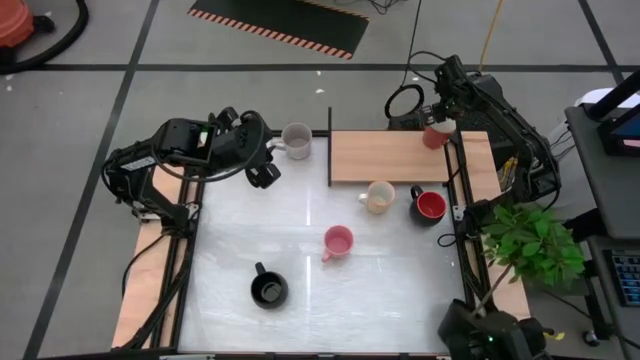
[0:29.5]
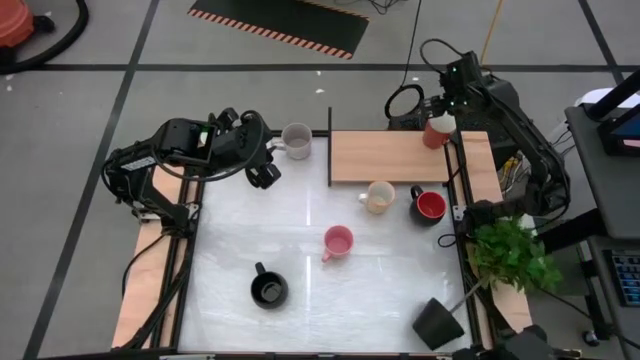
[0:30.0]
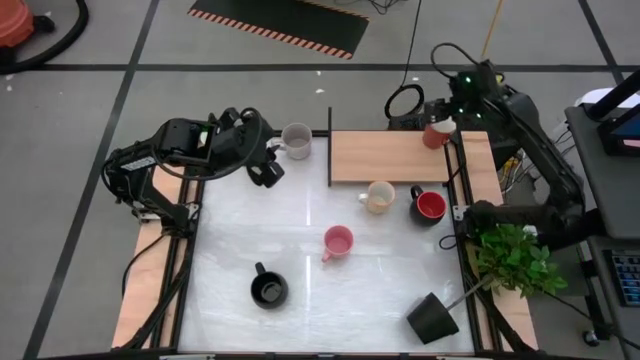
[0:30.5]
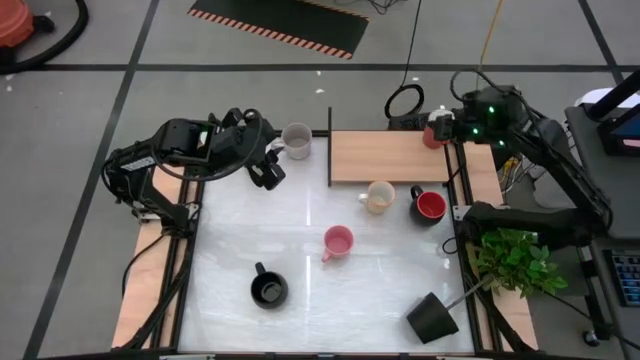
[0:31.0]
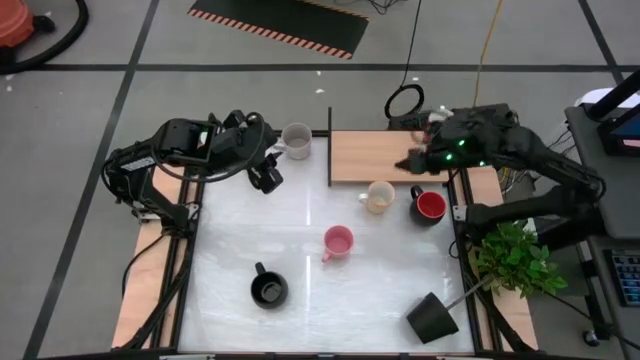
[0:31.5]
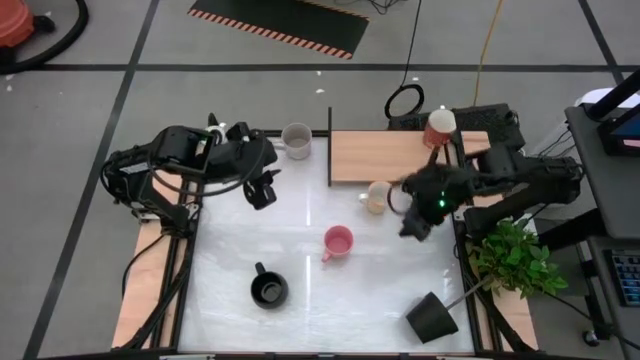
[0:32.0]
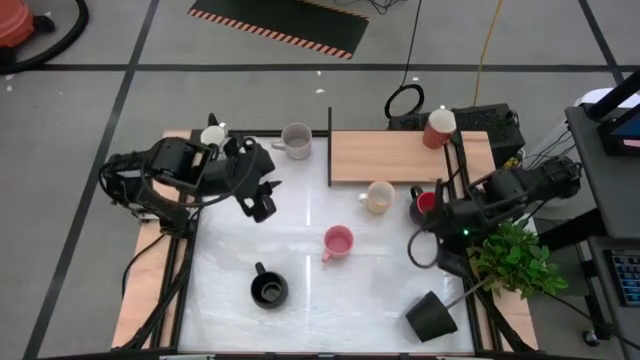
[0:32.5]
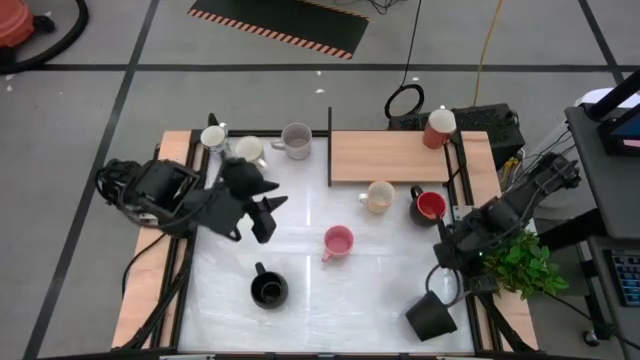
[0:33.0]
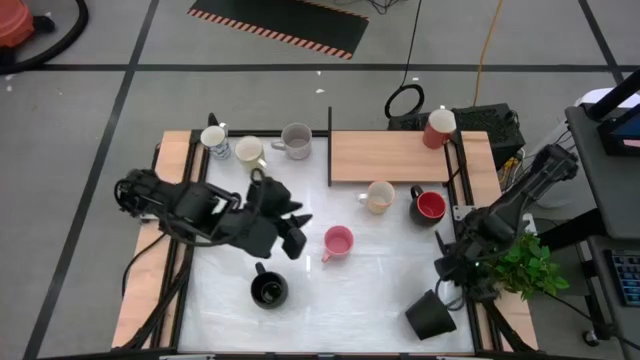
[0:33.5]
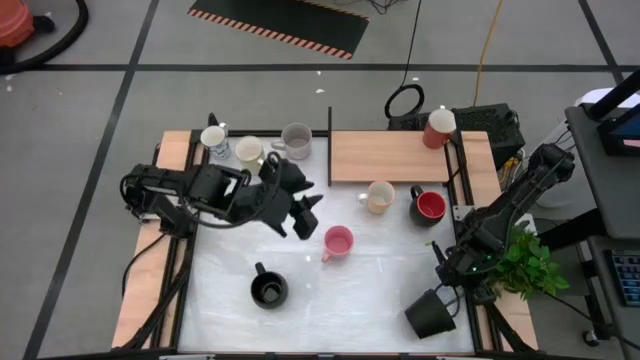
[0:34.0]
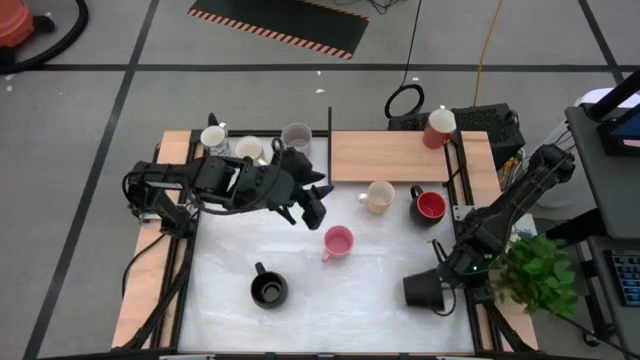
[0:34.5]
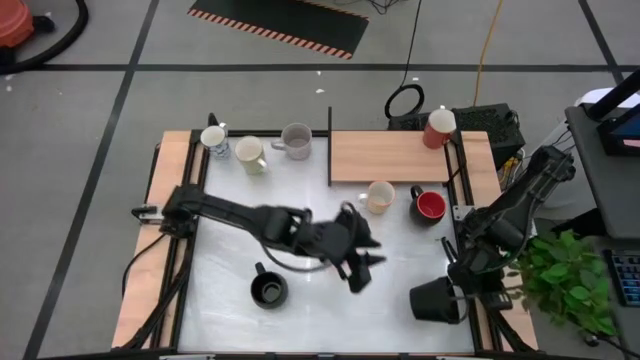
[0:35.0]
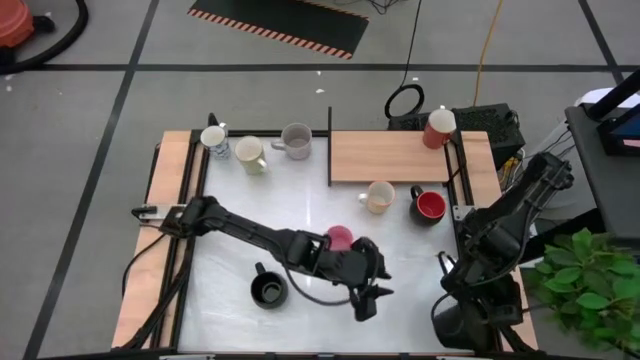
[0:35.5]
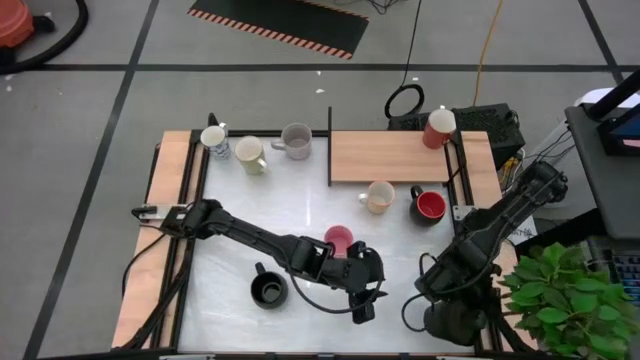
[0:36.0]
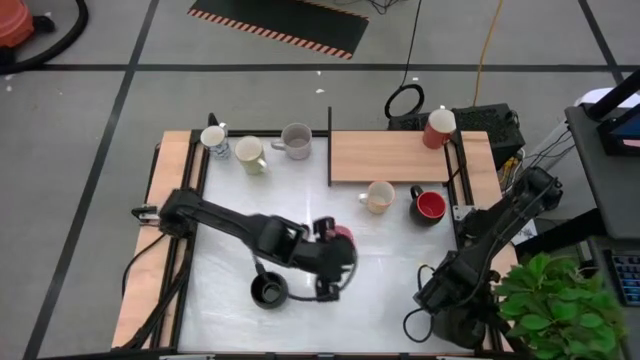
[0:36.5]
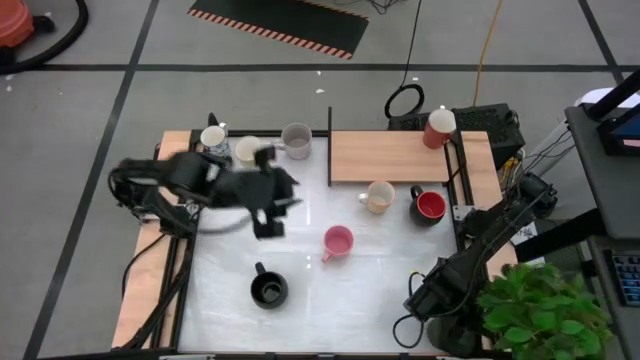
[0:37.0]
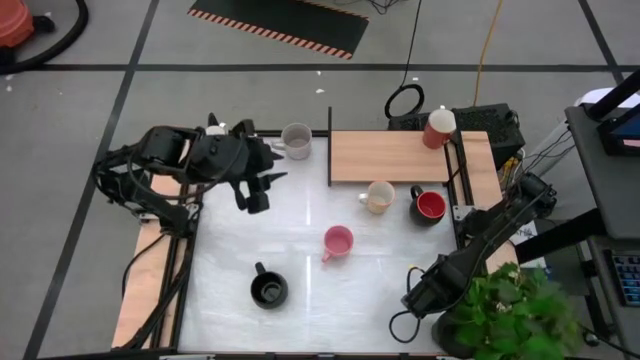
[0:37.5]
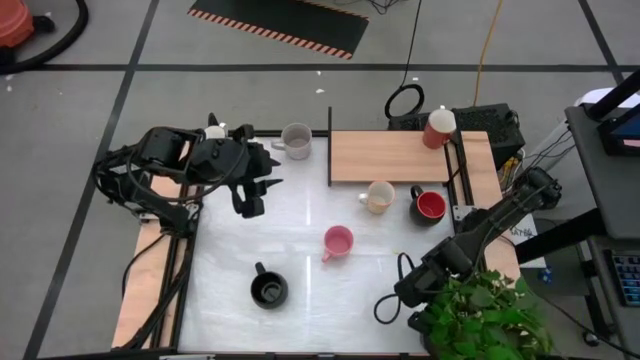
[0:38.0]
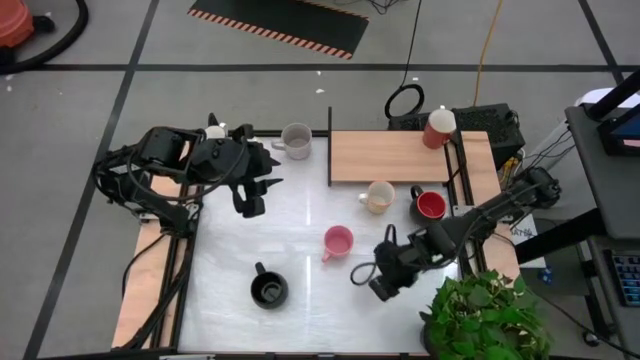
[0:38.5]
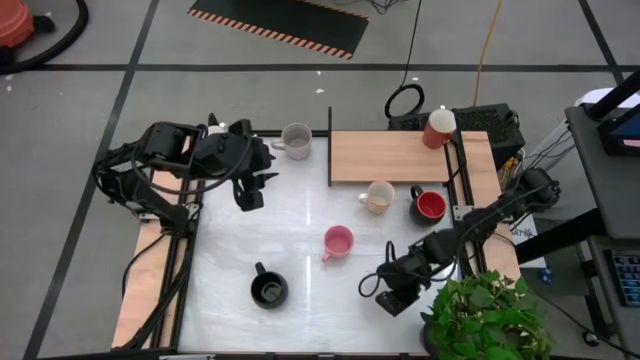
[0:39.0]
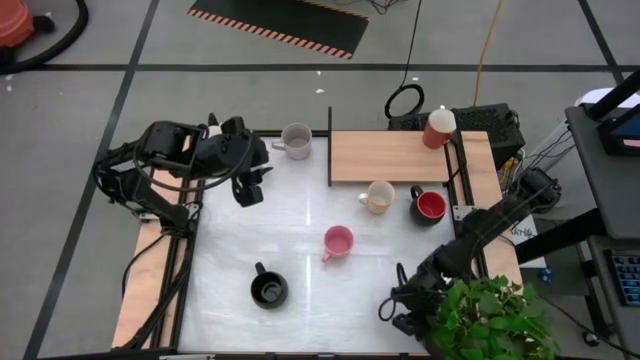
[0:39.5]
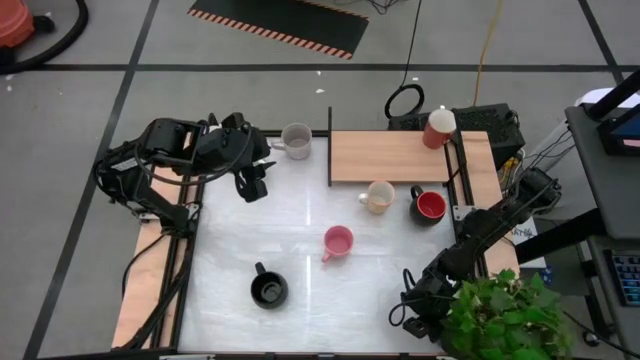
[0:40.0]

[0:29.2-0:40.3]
Task: Place coffee mugs
Adjust the plant

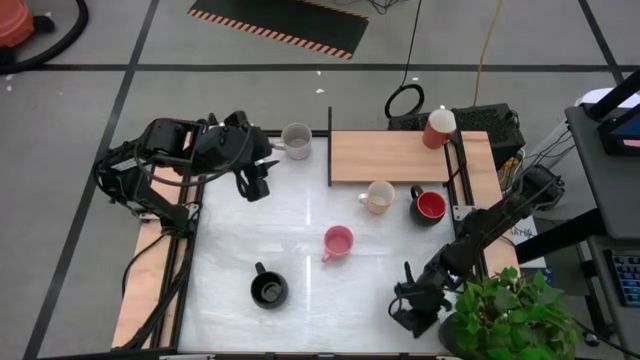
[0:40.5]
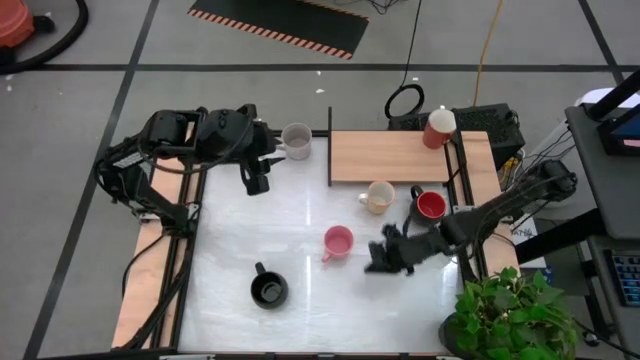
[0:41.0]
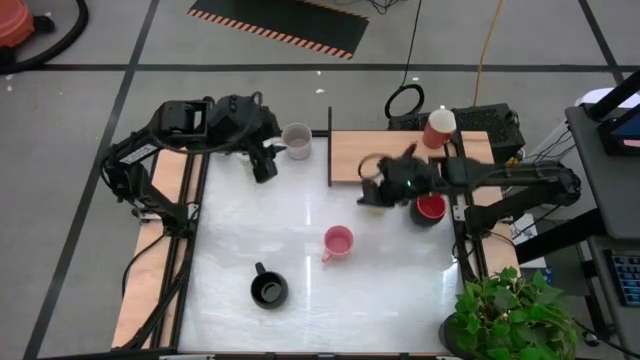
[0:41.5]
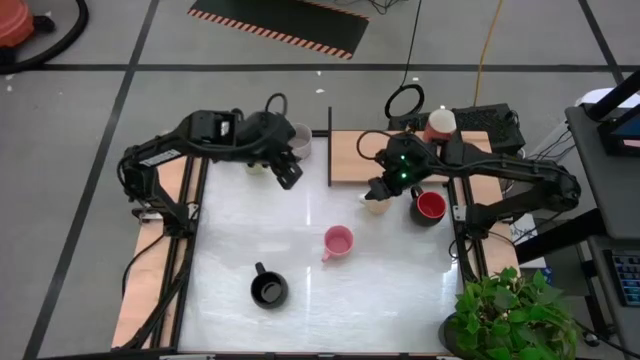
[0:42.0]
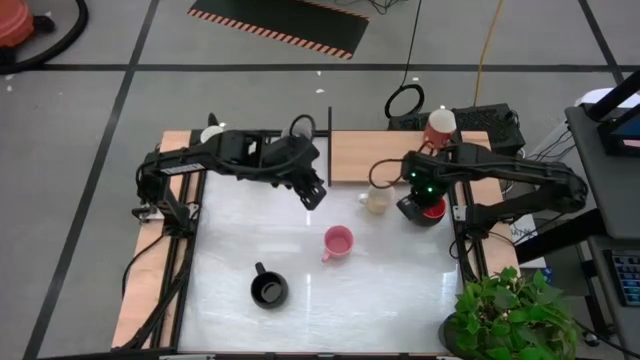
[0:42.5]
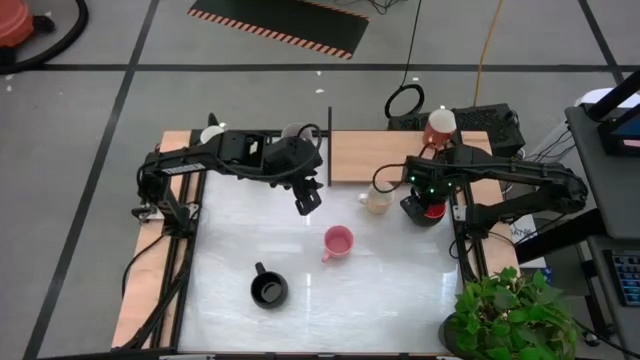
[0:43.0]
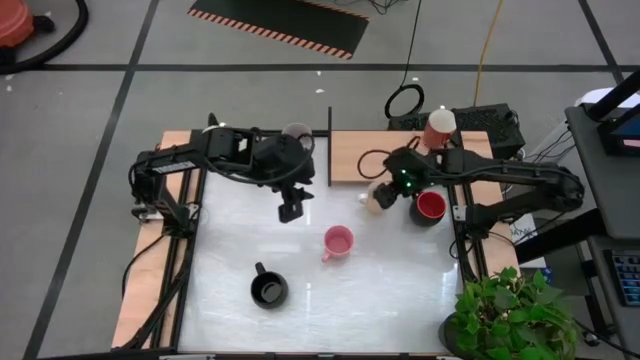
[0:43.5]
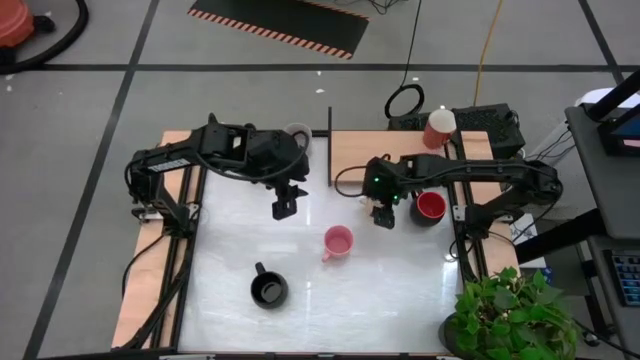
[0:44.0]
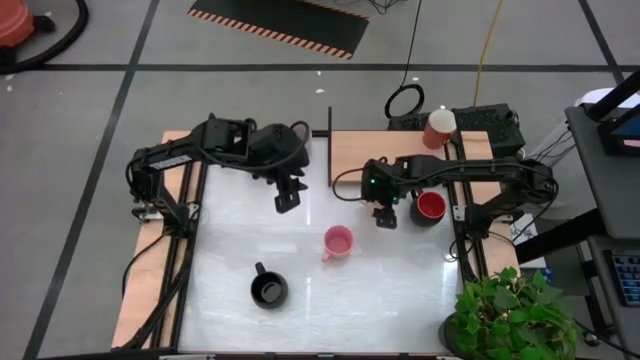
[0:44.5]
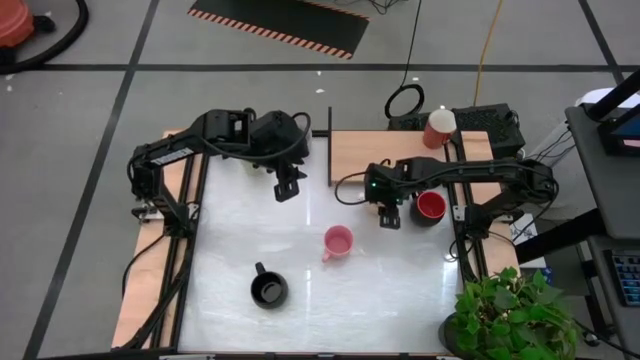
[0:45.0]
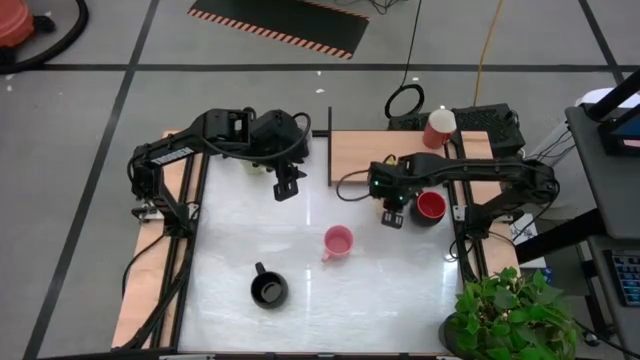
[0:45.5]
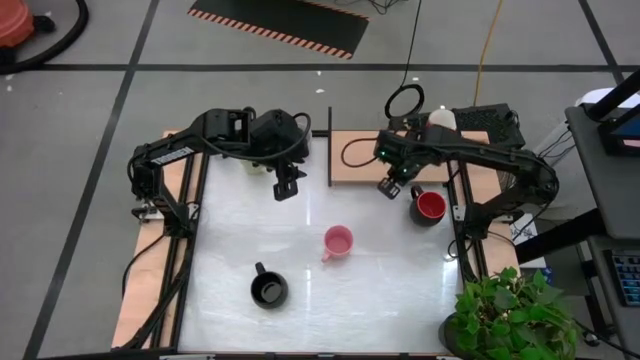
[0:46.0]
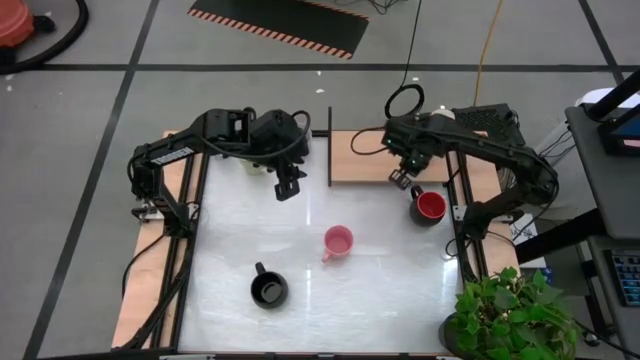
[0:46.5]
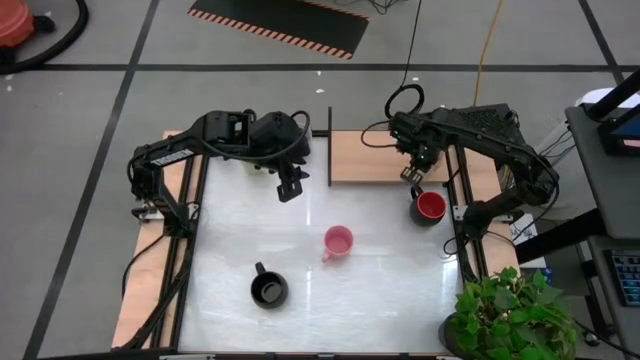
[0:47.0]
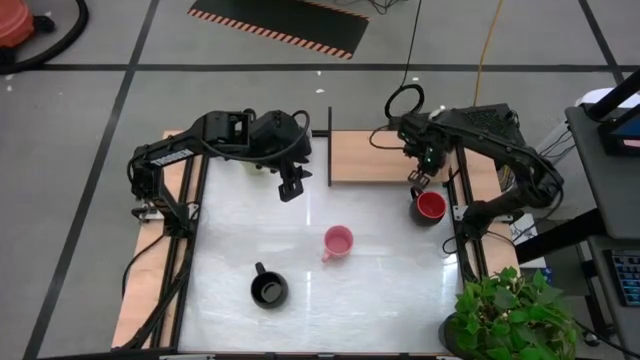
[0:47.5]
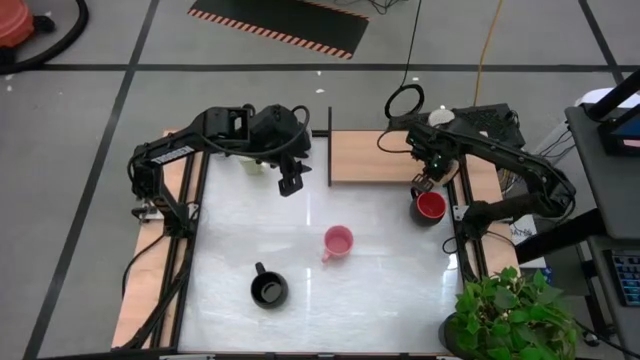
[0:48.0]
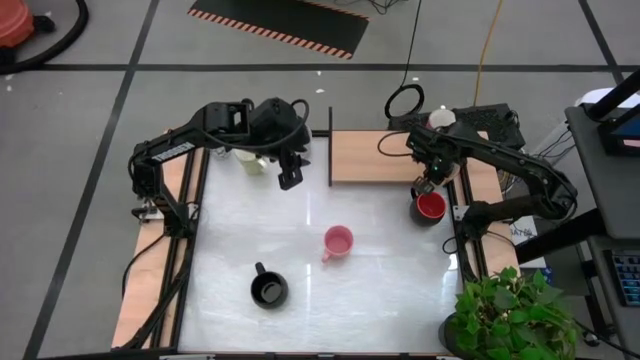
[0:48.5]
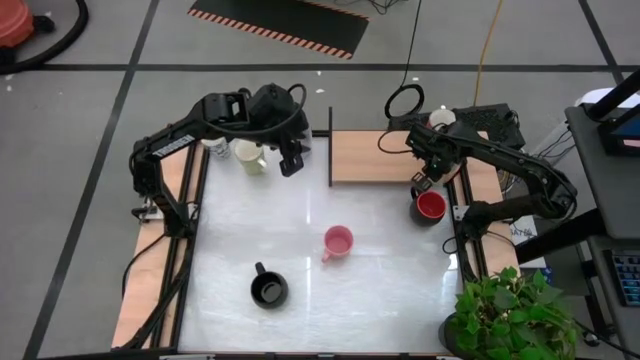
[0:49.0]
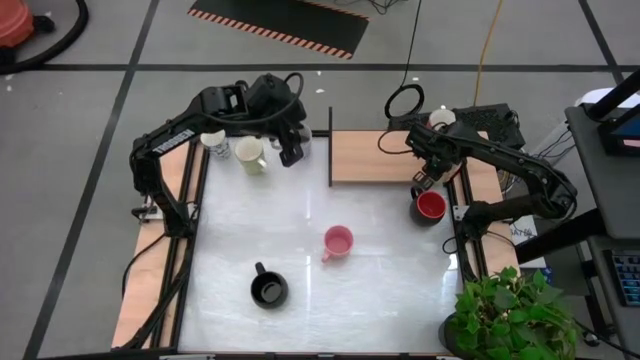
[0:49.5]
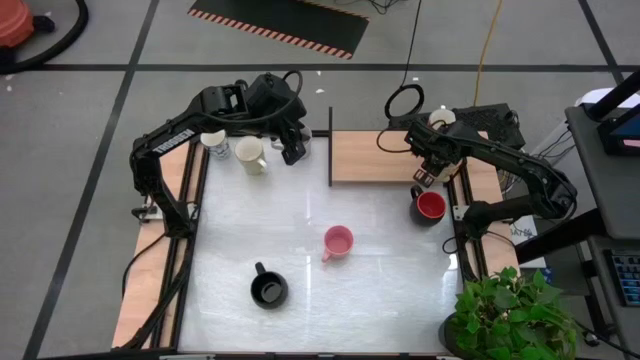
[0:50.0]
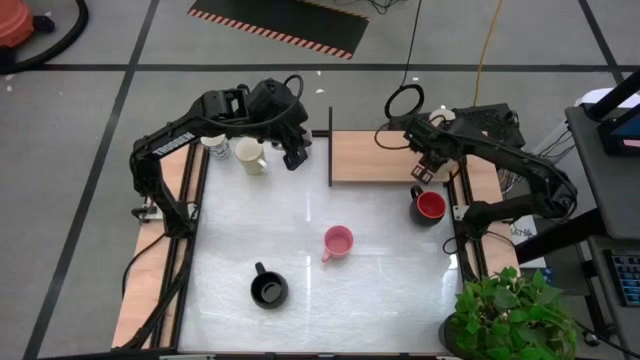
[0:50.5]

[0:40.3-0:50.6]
Put the orange patterned mug on the shelf
